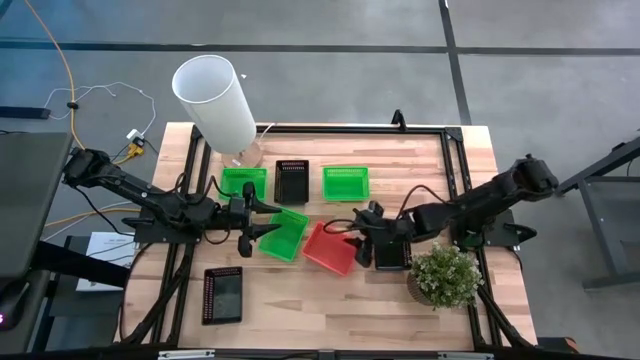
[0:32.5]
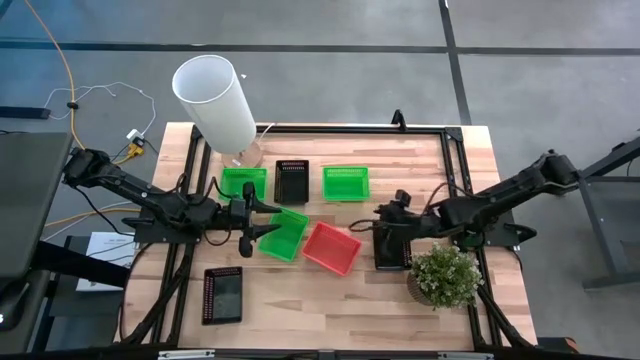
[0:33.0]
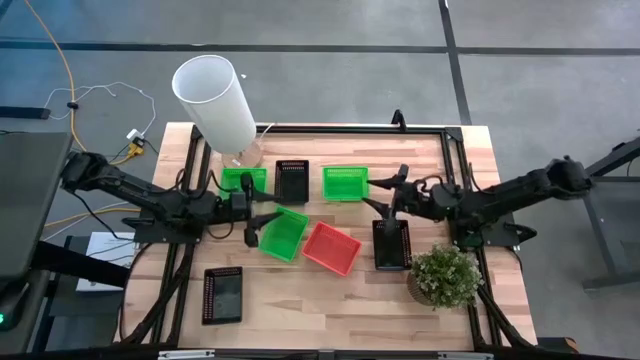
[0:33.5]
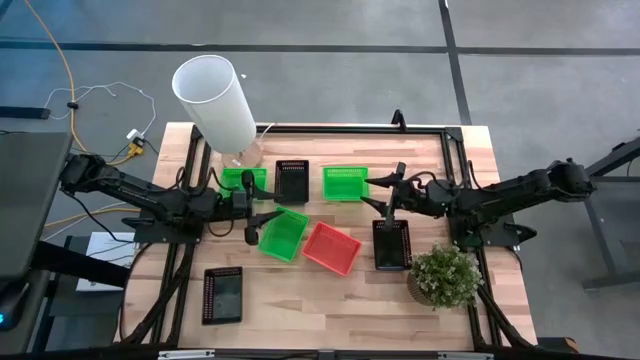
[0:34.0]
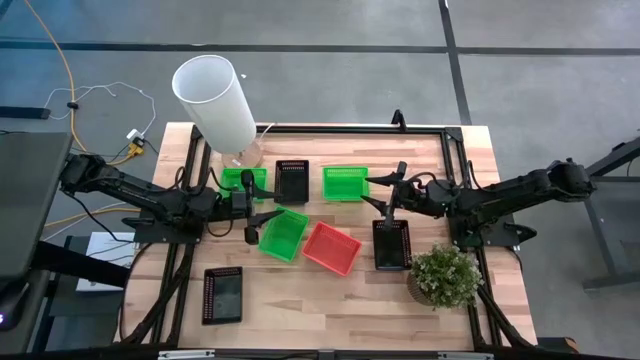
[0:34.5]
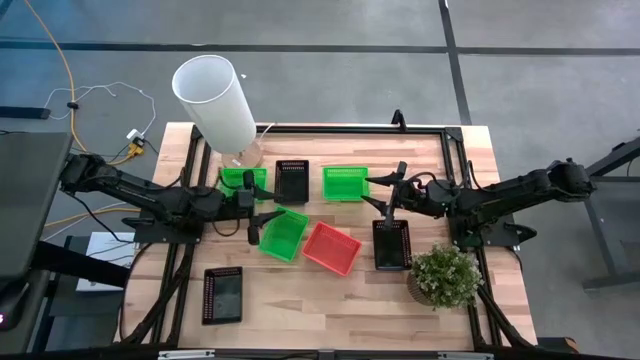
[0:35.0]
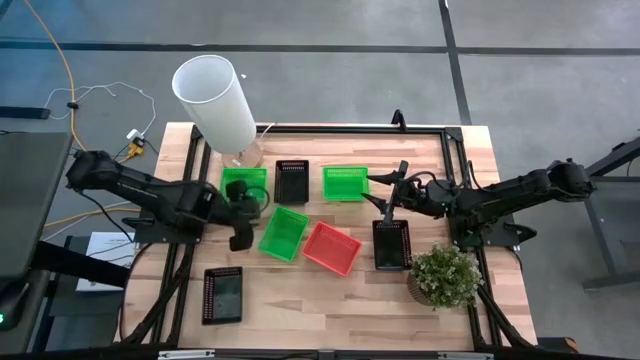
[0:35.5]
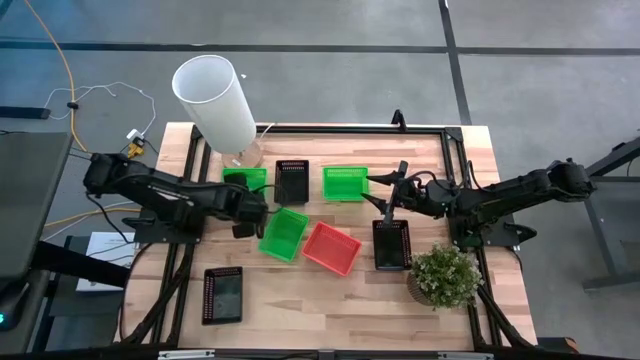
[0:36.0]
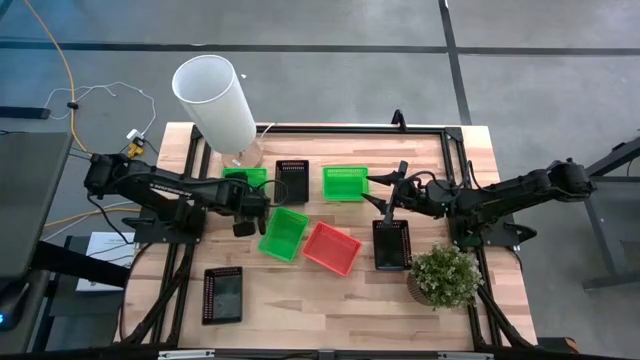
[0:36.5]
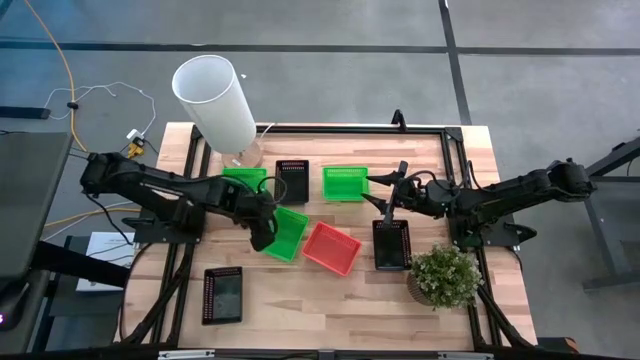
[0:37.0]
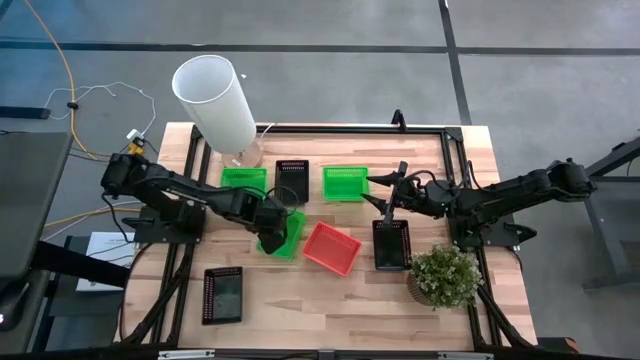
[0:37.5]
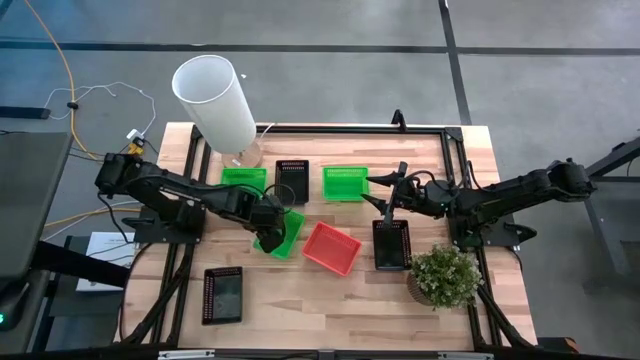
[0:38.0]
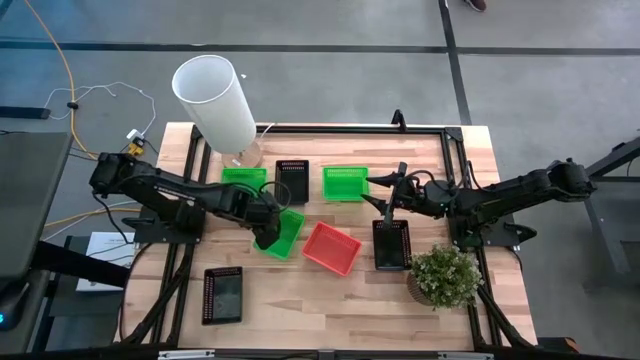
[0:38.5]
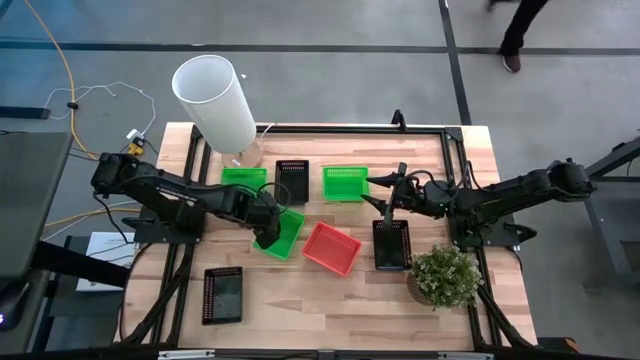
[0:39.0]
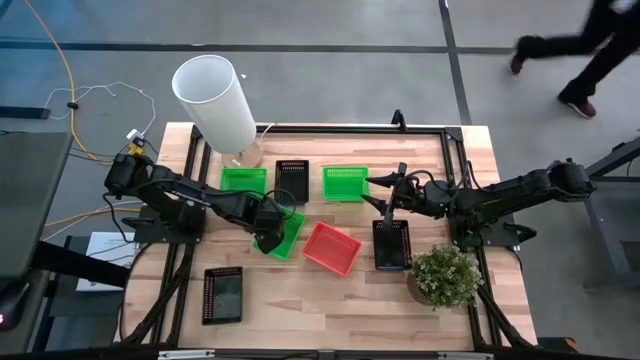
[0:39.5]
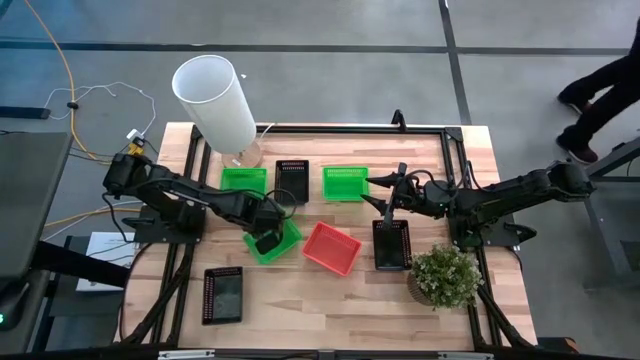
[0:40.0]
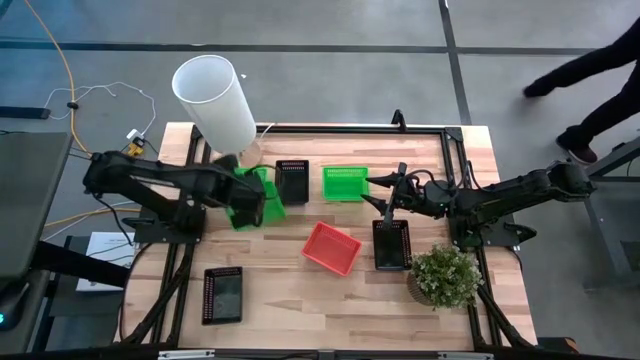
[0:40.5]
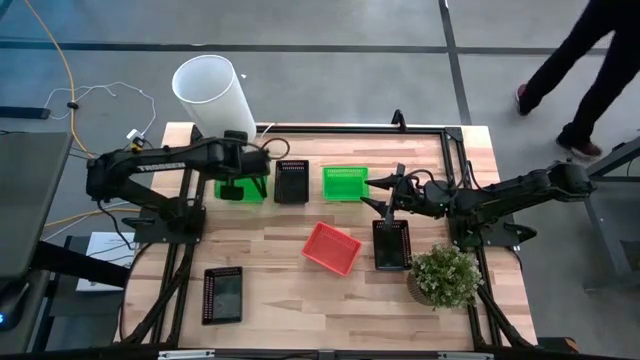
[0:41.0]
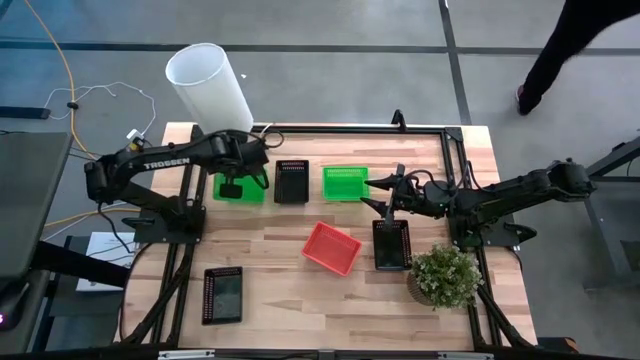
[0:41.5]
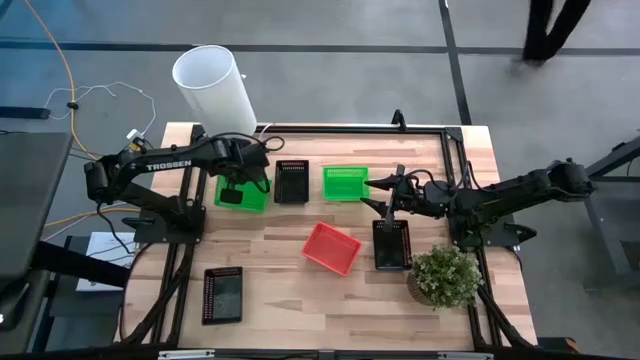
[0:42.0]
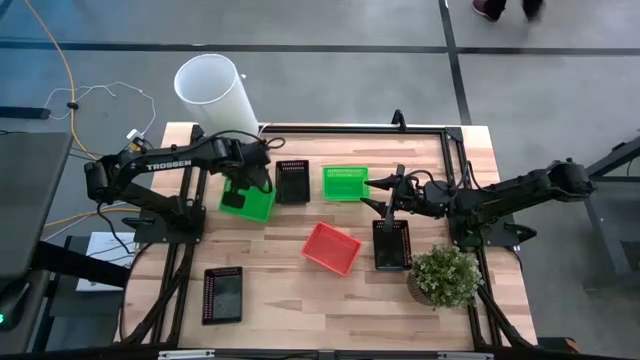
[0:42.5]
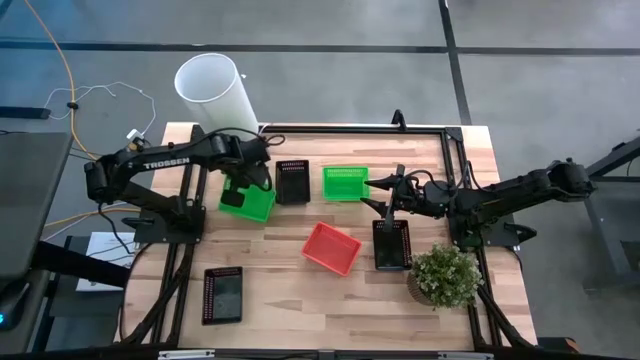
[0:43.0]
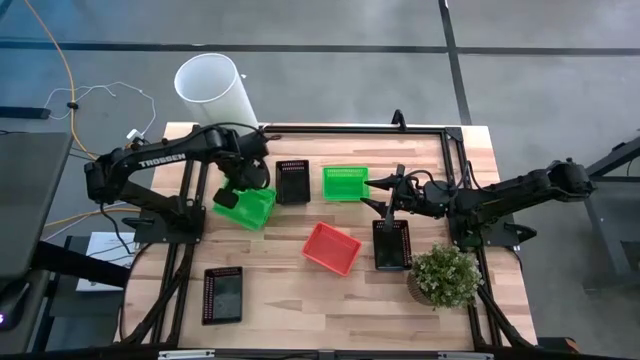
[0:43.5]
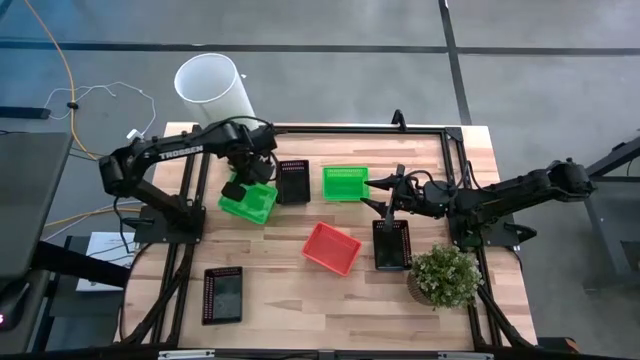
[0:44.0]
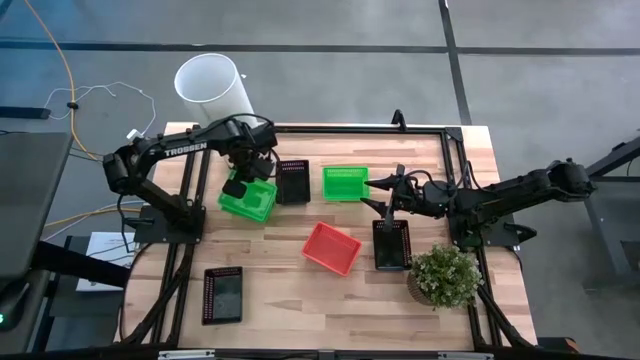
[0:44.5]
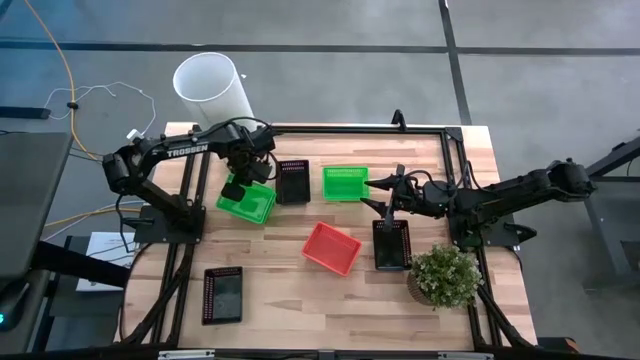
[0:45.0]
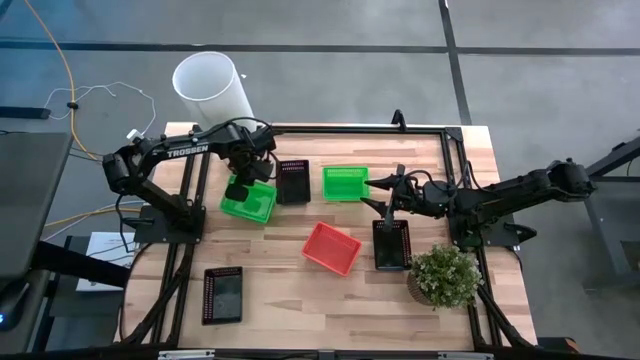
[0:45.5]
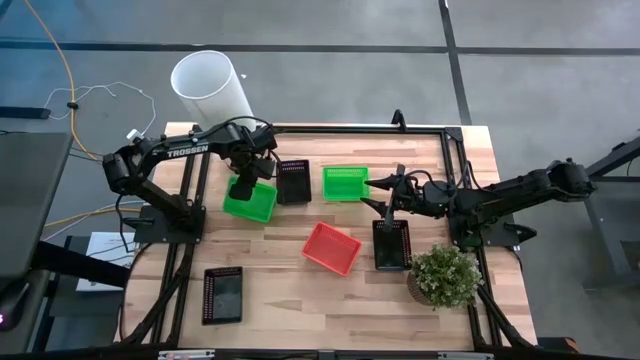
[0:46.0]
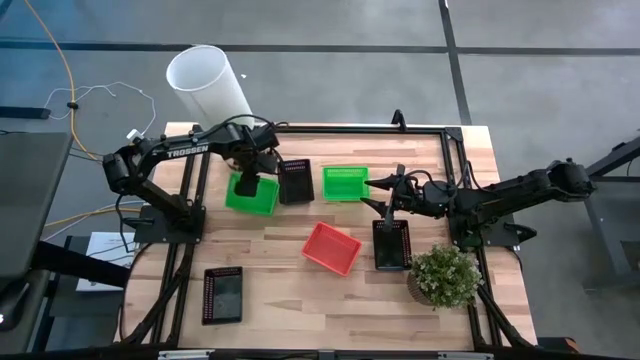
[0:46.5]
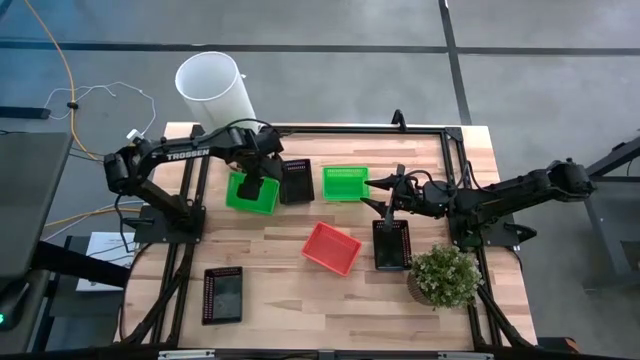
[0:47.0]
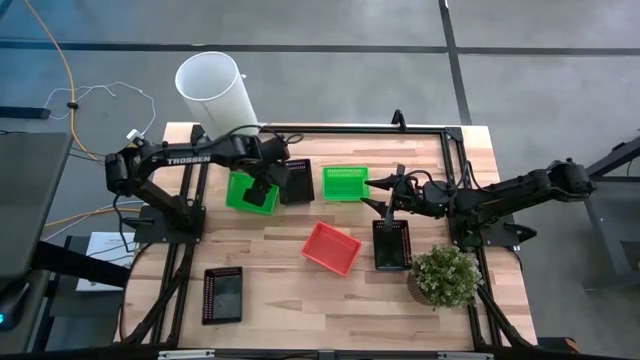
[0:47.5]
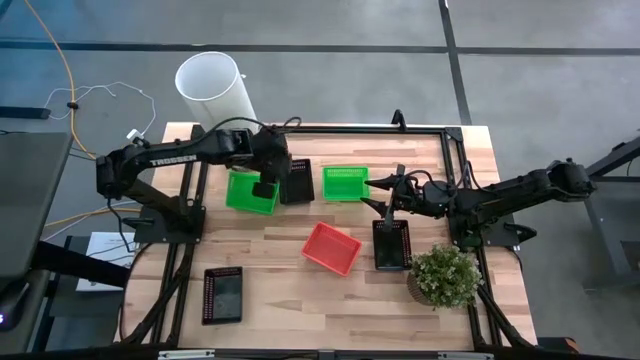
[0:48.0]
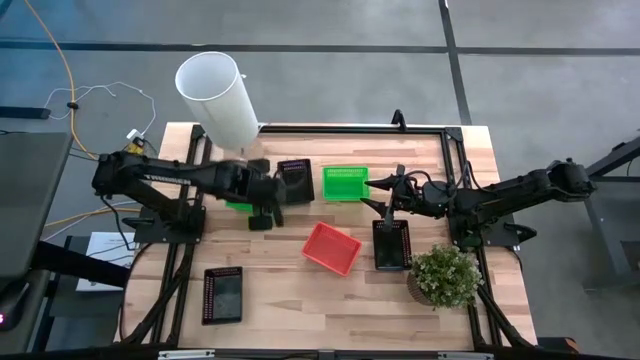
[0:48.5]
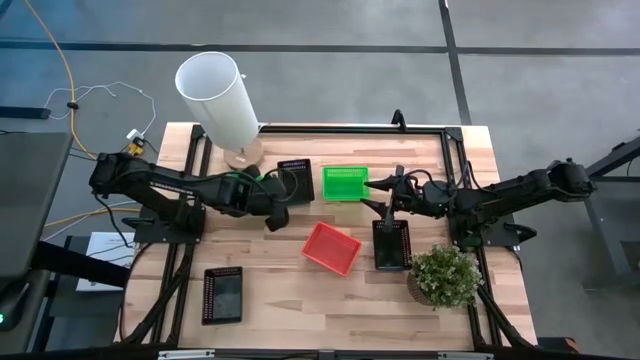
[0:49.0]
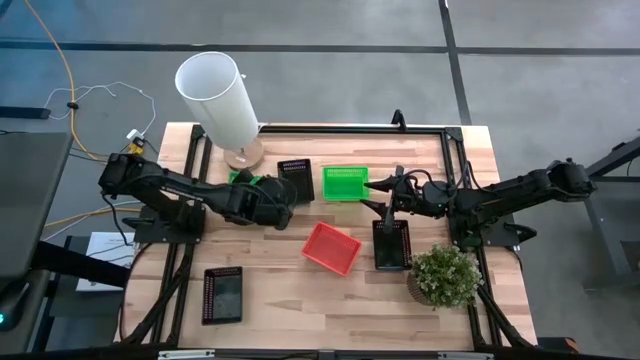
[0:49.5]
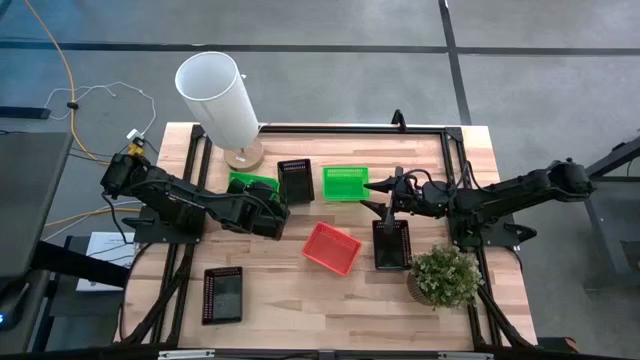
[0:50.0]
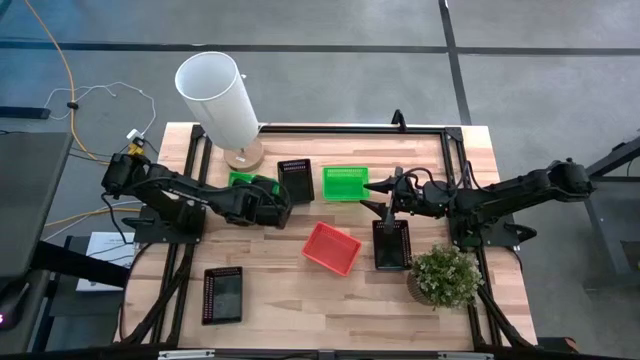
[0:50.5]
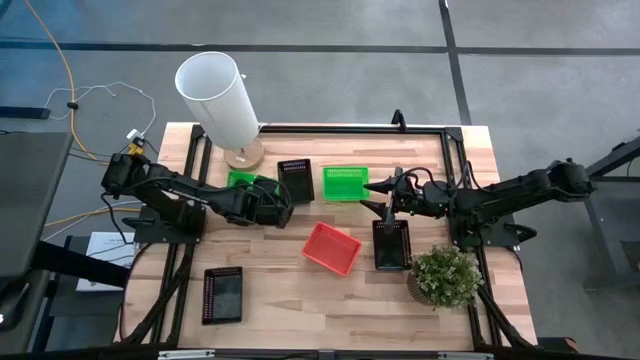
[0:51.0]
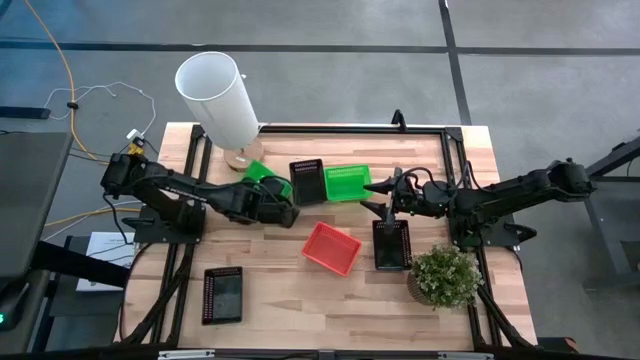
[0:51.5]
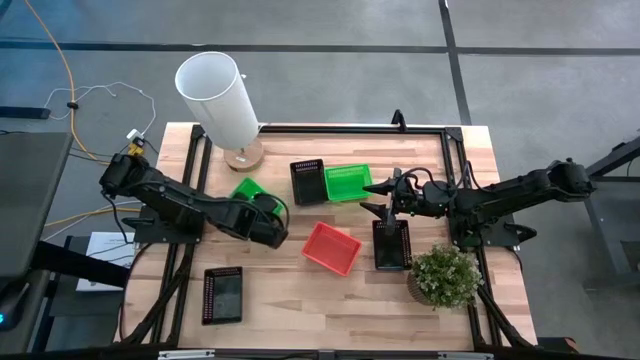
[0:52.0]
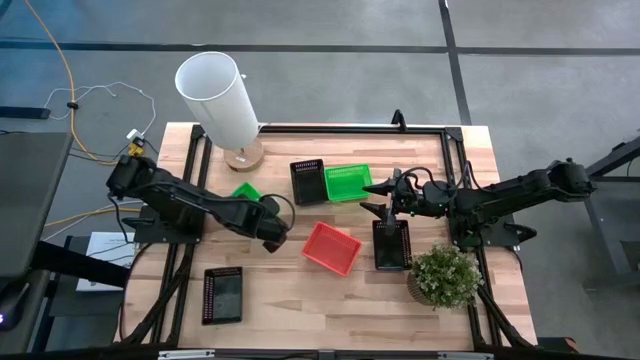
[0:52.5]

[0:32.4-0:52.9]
Stack the bottom green bin on the top left green bin
